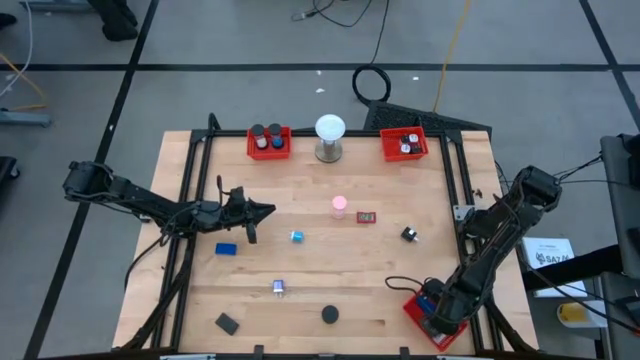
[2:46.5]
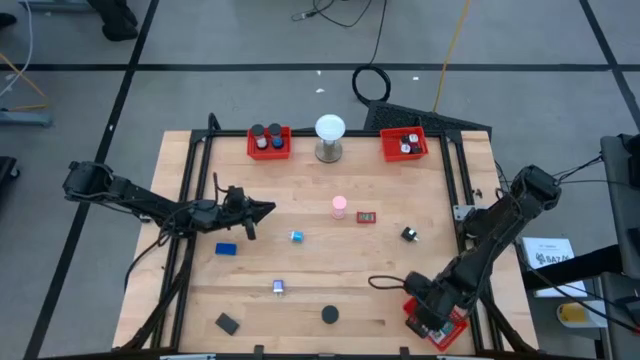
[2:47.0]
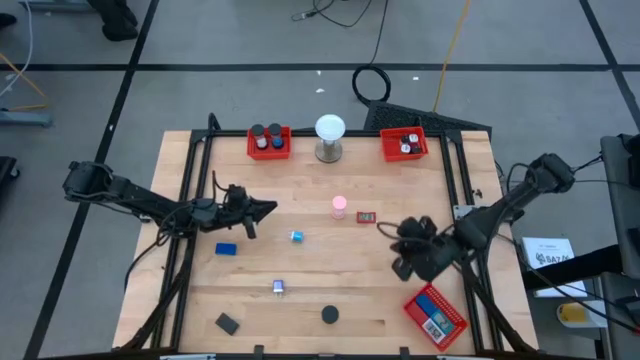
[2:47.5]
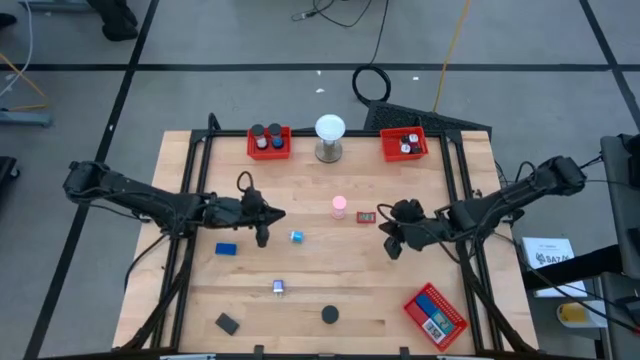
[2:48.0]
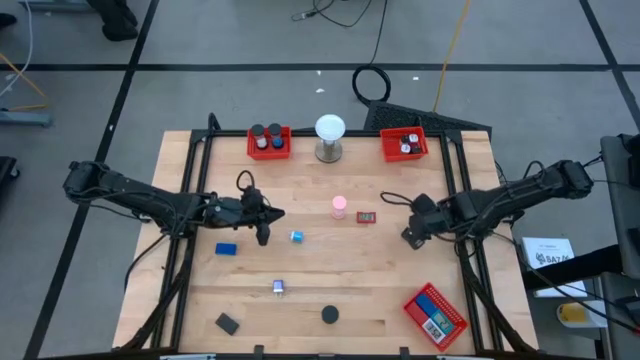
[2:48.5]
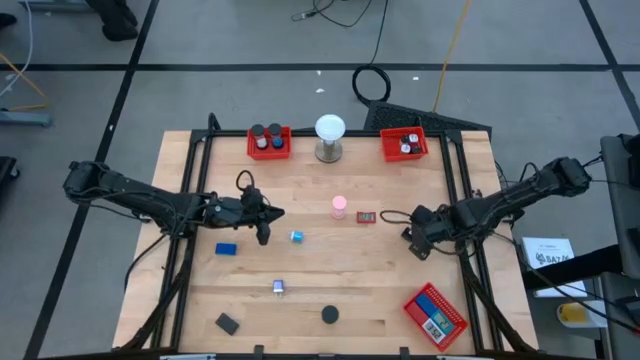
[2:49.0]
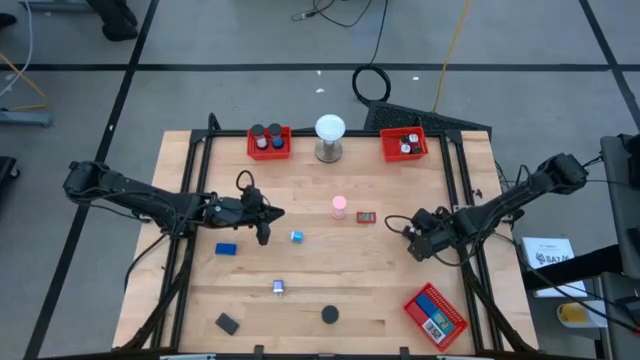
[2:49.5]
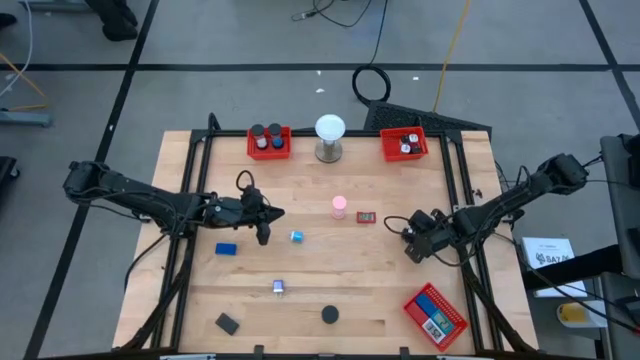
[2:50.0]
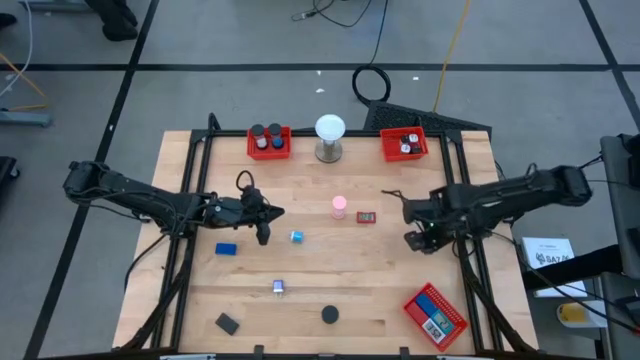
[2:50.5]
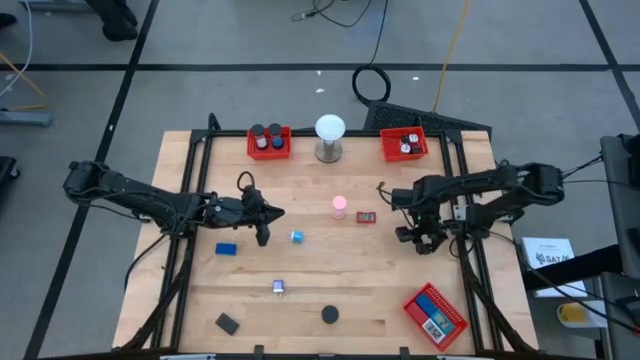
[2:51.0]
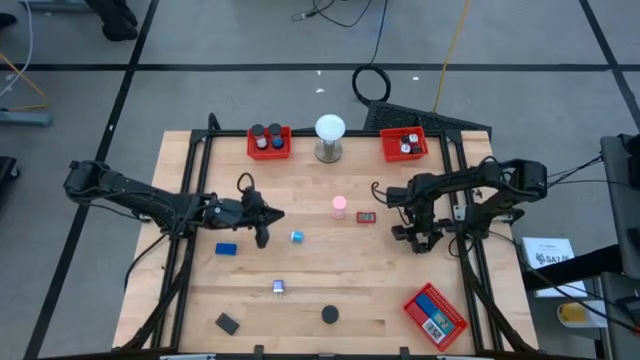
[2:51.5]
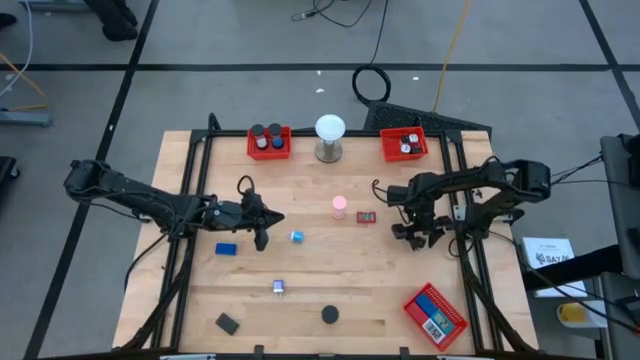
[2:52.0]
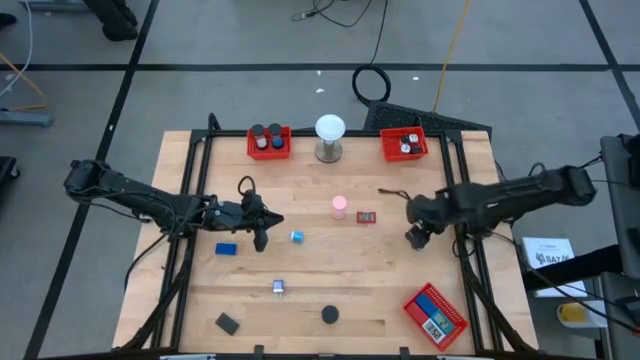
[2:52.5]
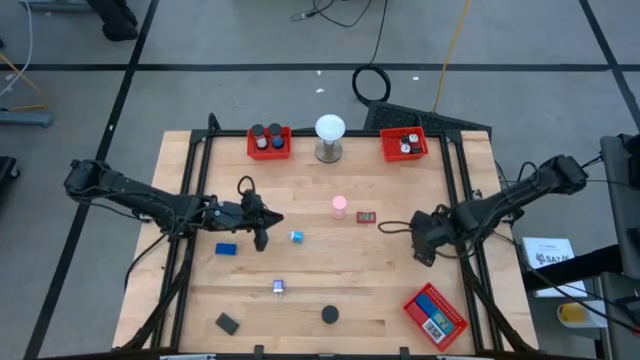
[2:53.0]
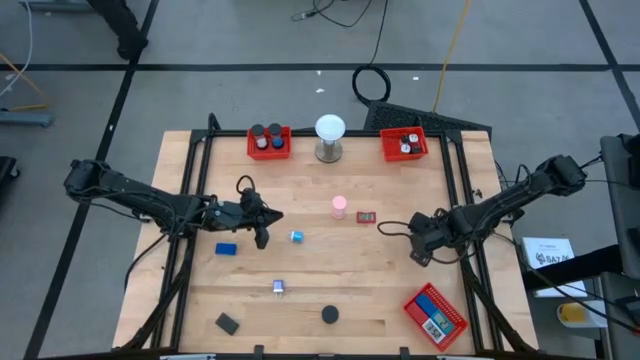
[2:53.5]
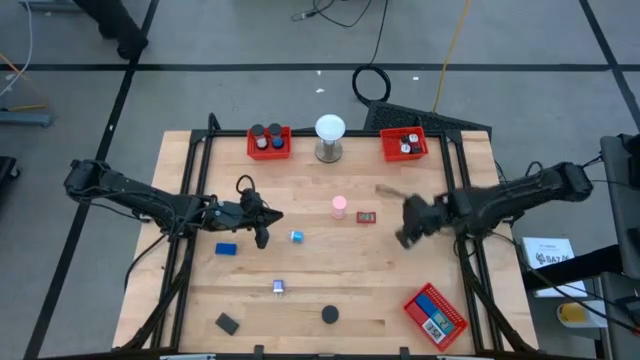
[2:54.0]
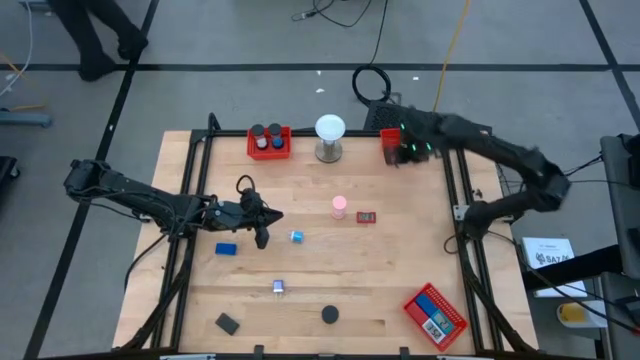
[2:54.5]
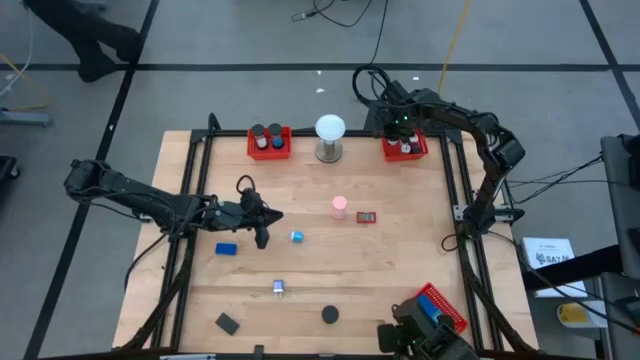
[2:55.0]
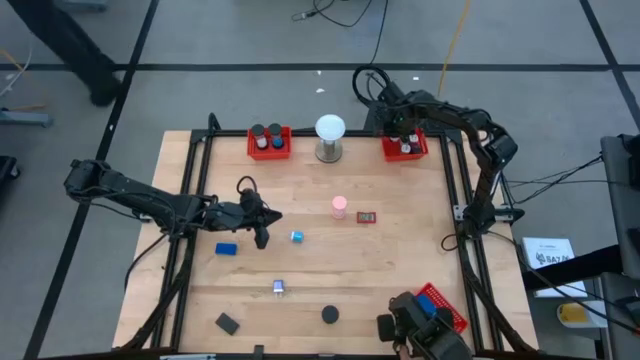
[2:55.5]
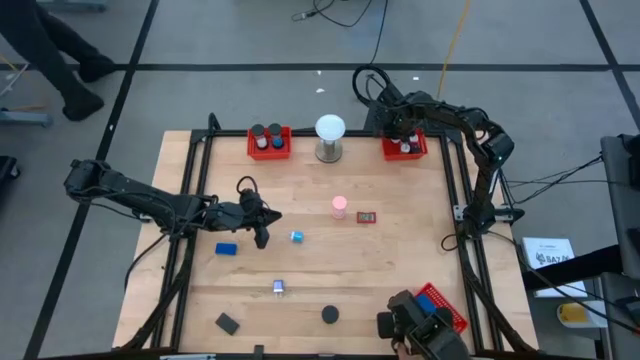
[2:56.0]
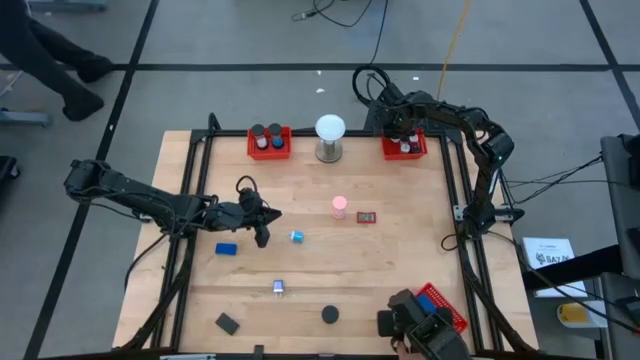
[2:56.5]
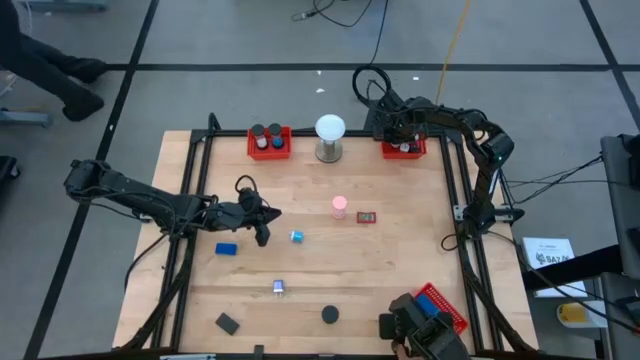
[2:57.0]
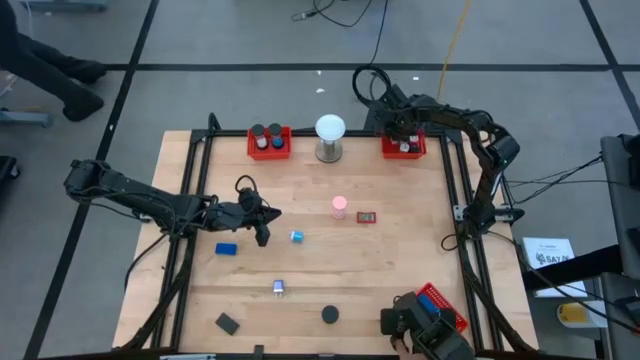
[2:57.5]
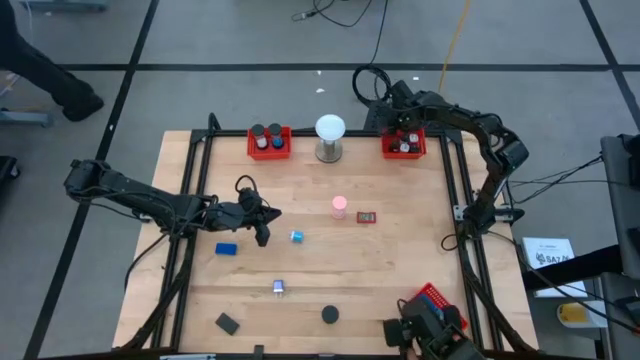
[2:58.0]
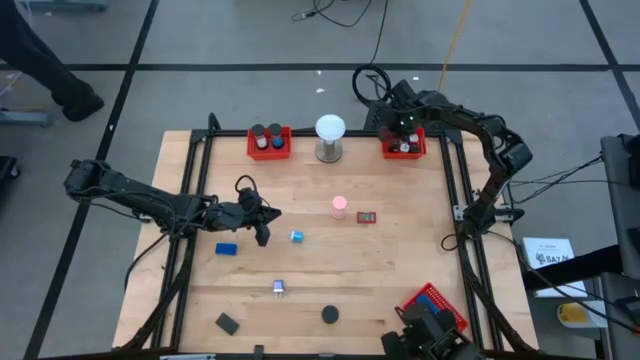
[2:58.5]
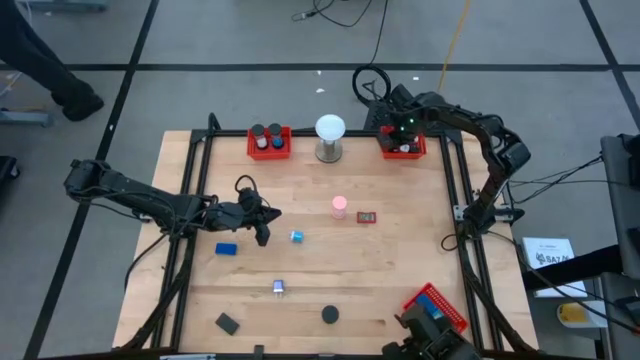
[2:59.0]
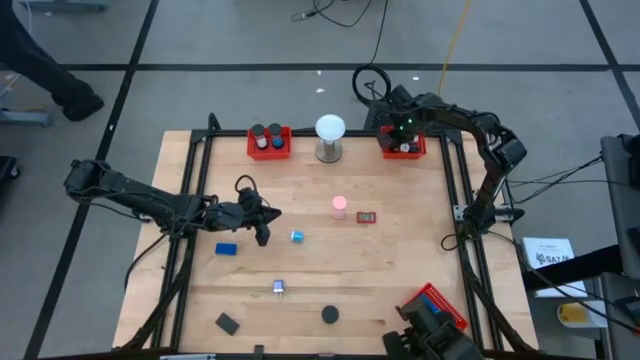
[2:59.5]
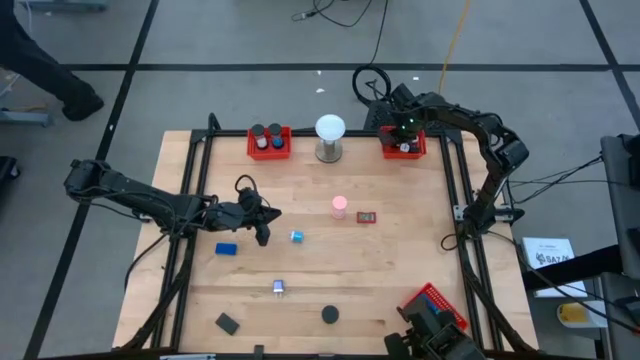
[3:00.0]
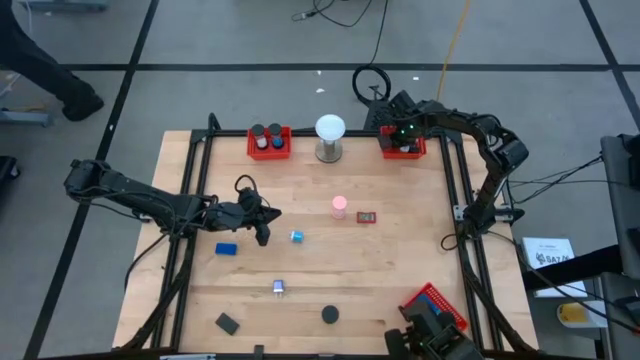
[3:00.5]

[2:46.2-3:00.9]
Task: Pick & Place Office items
Put the black charger adapter into the top right red bin
